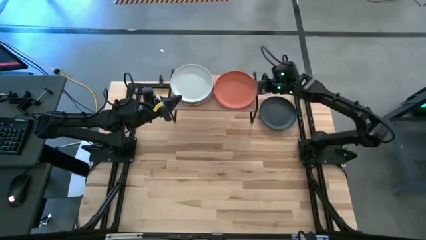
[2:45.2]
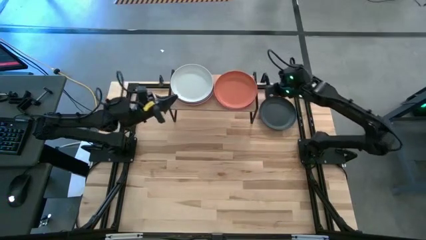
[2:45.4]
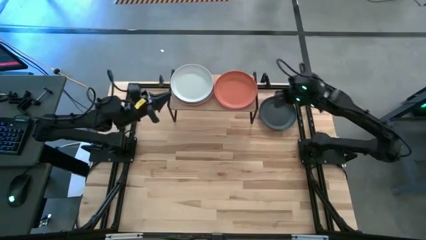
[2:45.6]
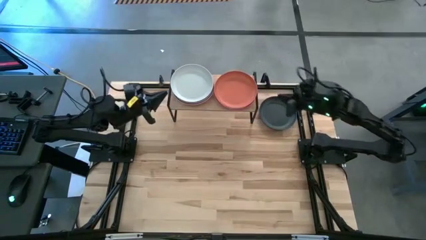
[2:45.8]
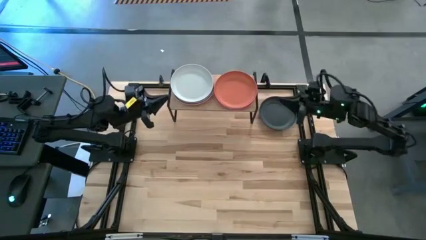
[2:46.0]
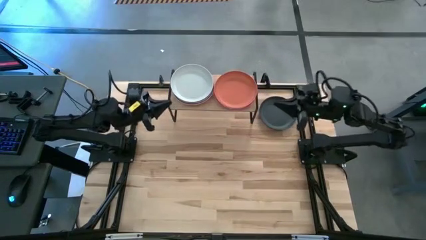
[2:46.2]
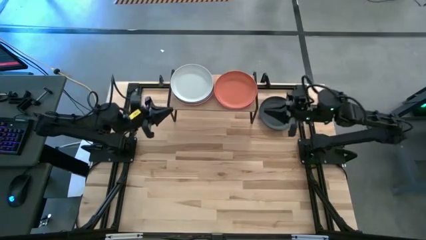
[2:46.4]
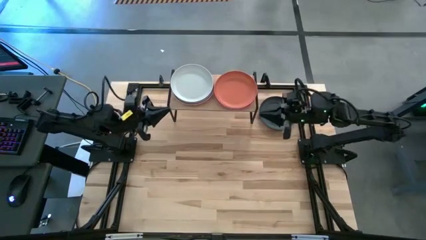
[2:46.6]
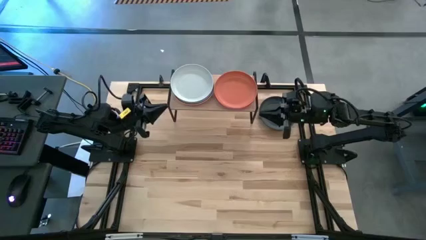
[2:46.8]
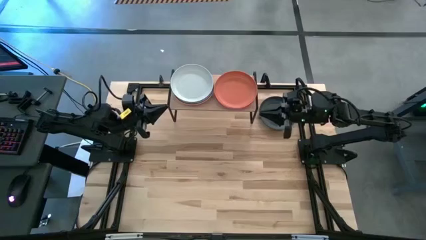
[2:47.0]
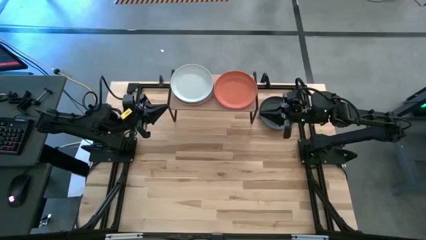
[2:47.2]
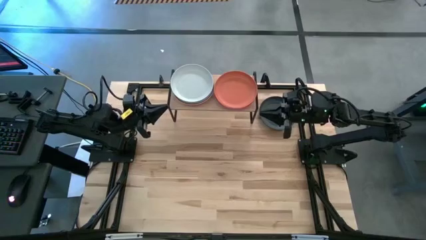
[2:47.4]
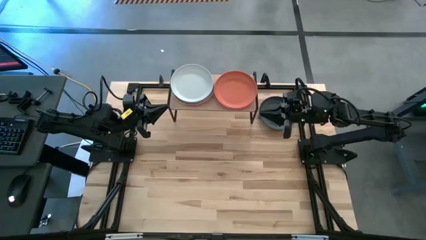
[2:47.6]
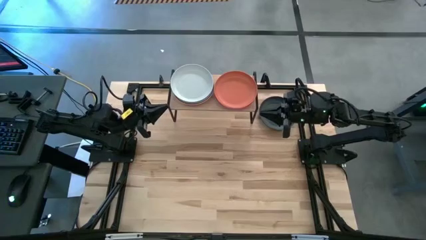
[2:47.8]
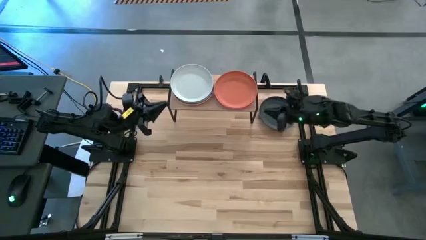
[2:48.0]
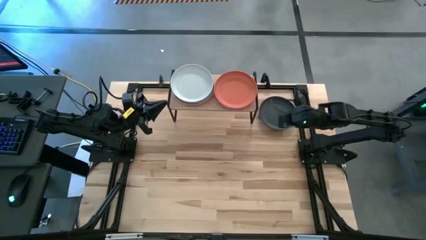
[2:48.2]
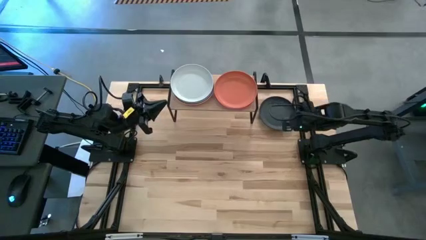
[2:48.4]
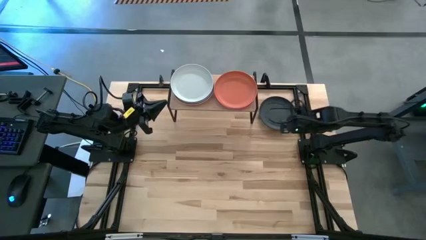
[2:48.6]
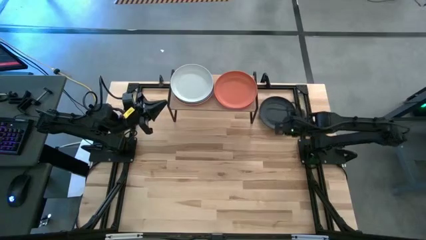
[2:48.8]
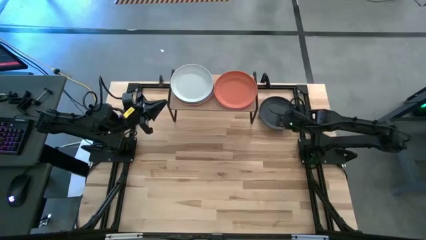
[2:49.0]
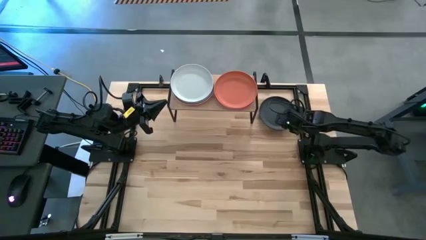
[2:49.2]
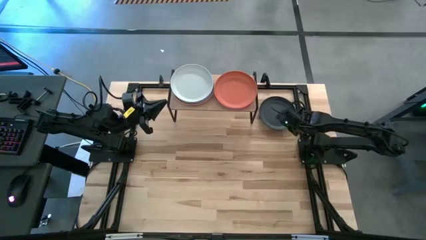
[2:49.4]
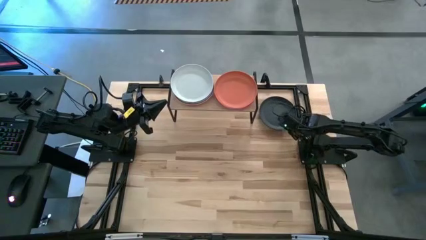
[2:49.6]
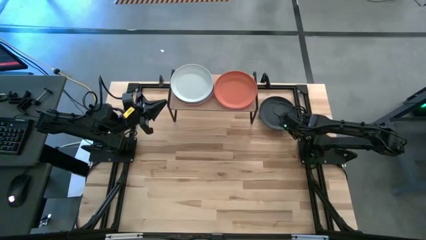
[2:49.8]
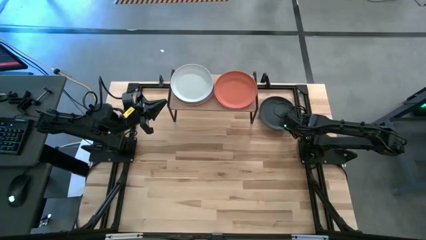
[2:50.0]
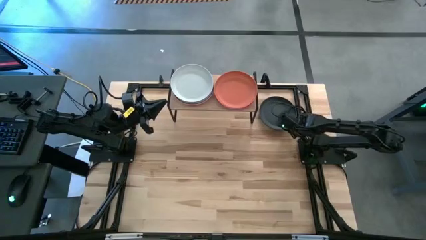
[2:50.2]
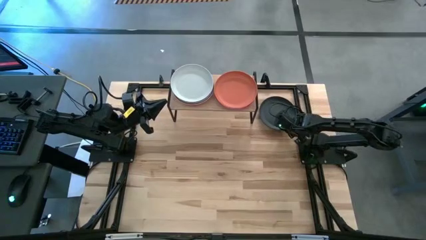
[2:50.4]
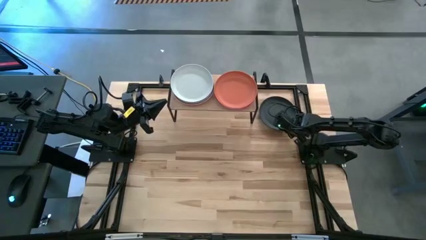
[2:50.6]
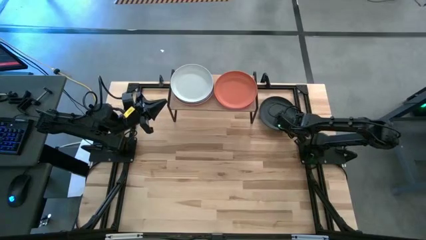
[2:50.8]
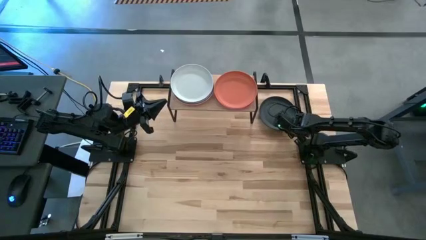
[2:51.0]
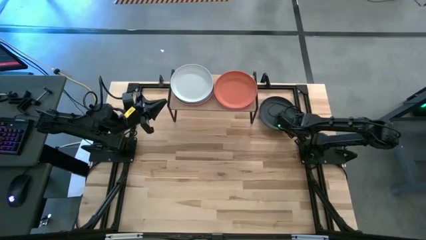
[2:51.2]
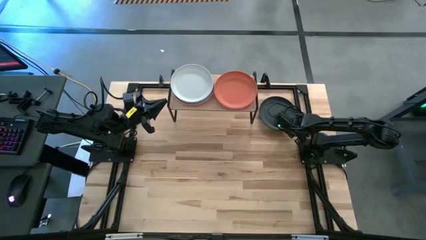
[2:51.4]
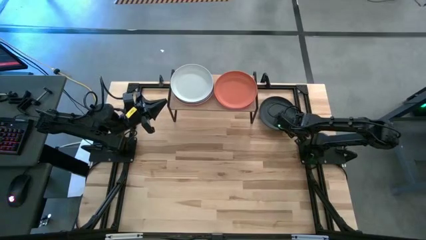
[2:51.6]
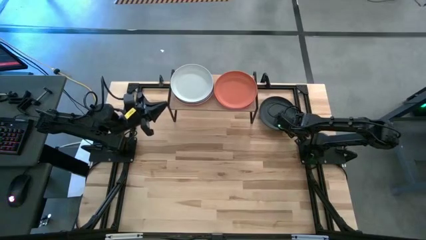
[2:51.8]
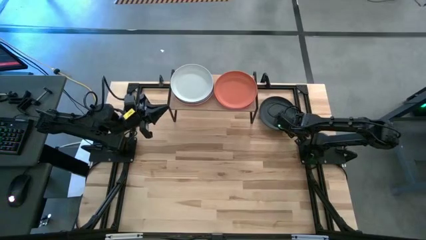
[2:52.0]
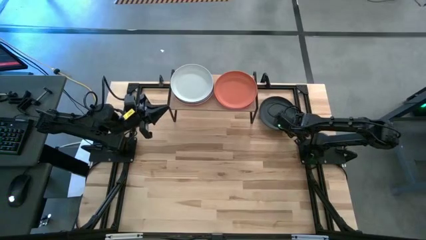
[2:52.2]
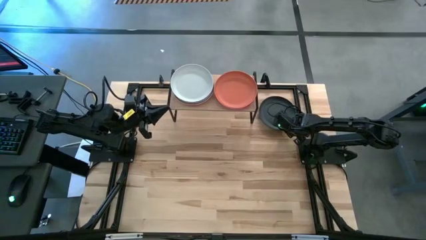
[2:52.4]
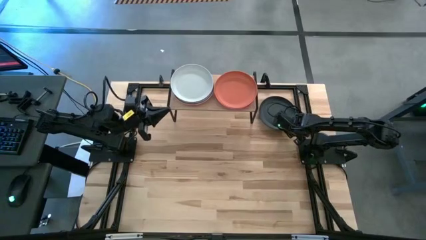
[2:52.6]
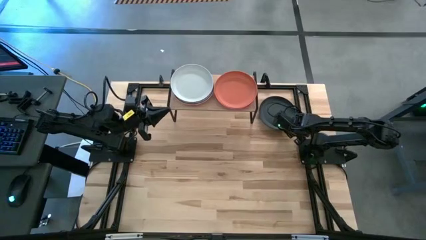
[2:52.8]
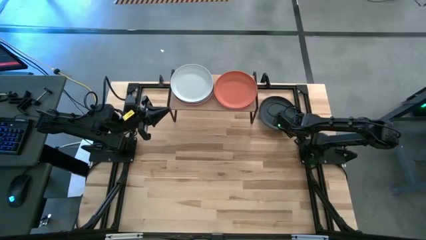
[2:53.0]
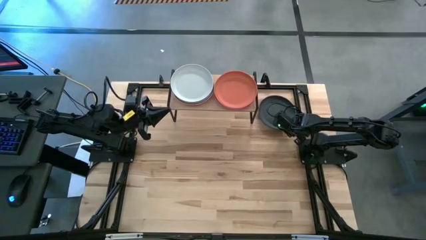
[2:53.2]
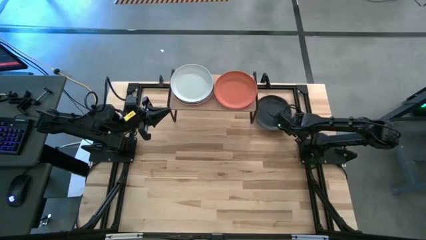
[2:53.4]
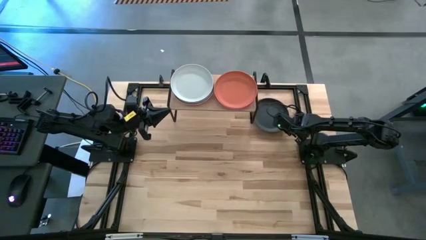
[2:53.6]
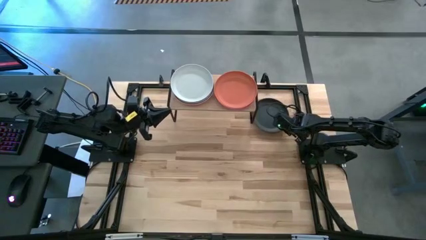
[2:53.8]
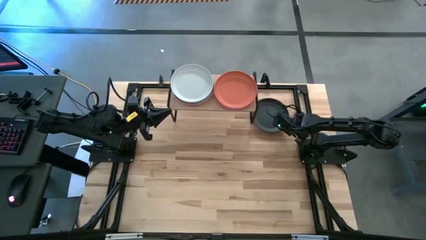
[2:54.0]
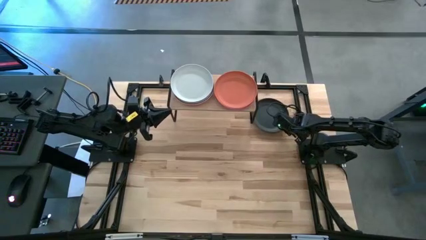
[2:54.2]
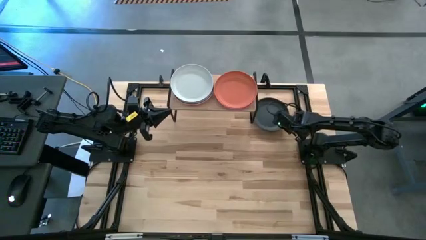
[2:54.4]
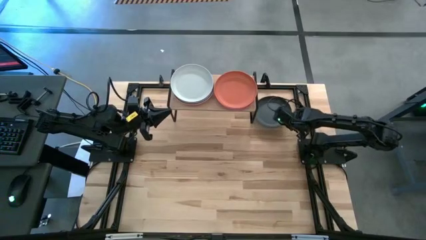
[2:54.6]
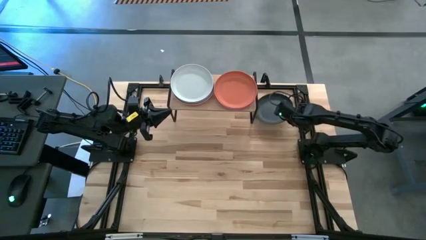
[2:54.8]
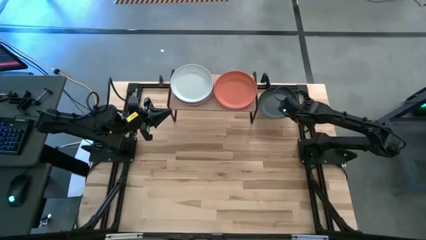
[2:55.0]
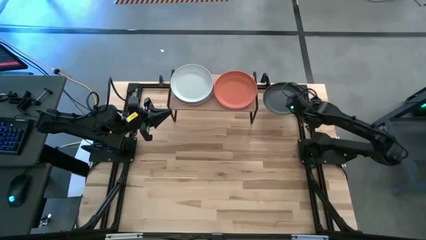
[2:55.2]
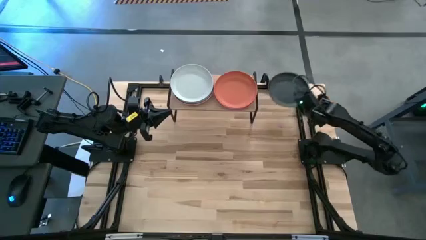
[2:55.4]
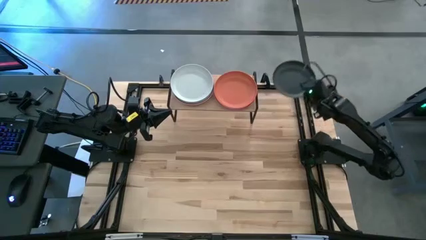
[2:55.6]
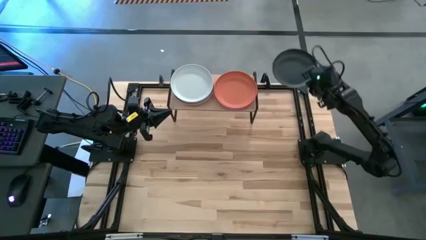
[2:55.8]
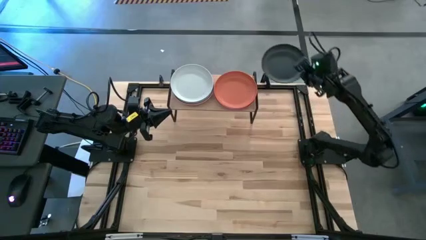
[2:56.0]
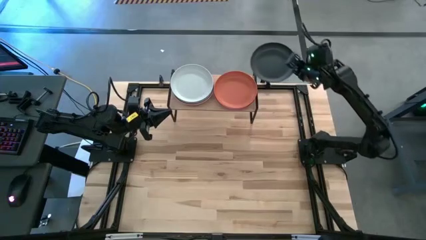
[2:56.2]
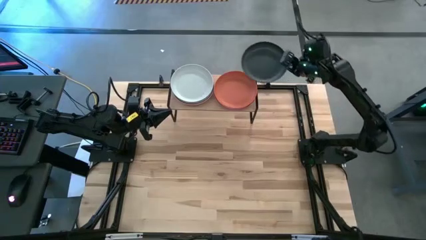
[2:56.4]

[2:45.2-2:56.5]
Task: Place and stack plates onto a shelf
Stack the black plate on top of the brown plate

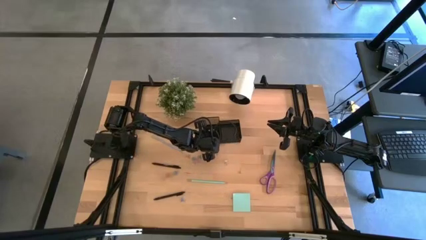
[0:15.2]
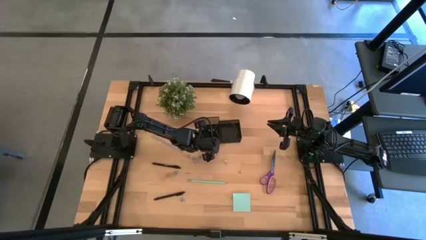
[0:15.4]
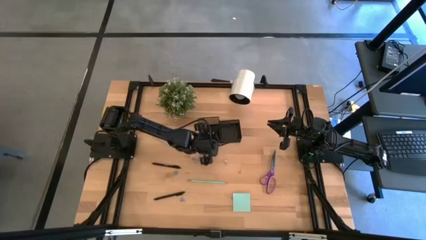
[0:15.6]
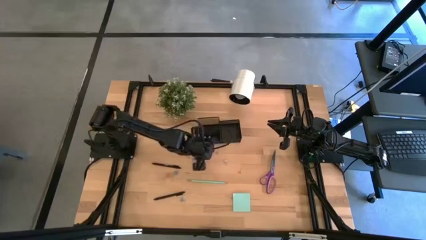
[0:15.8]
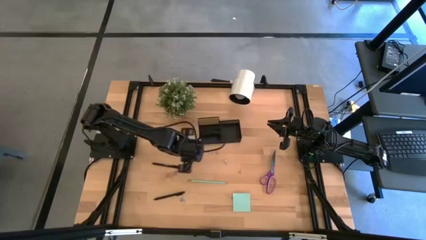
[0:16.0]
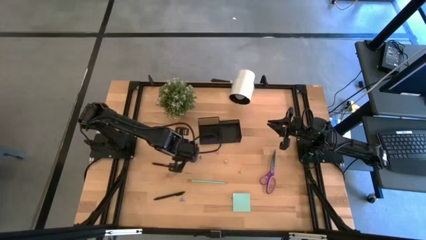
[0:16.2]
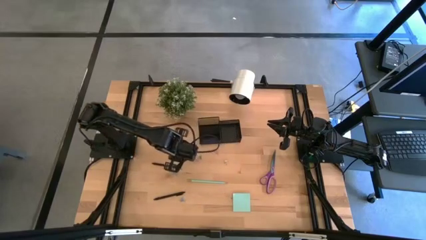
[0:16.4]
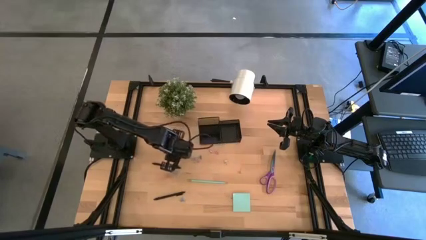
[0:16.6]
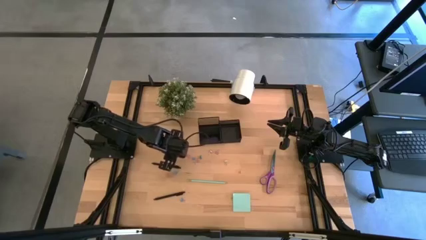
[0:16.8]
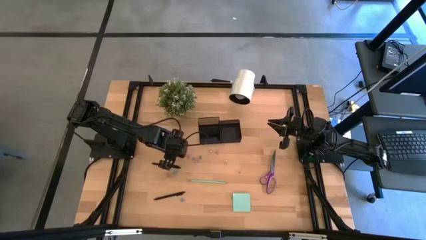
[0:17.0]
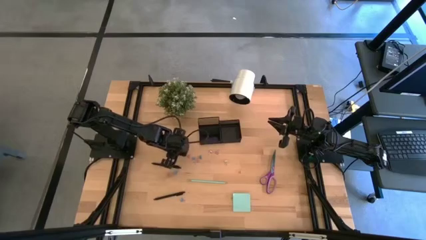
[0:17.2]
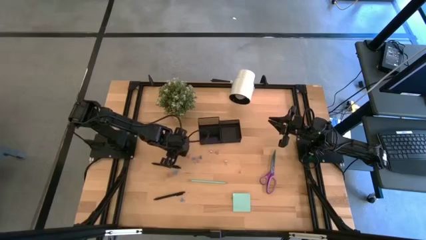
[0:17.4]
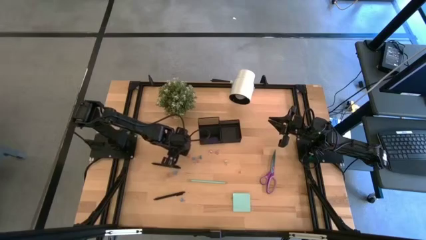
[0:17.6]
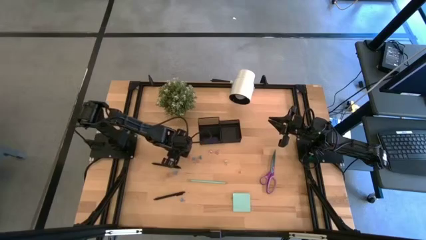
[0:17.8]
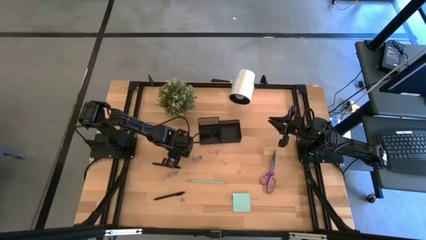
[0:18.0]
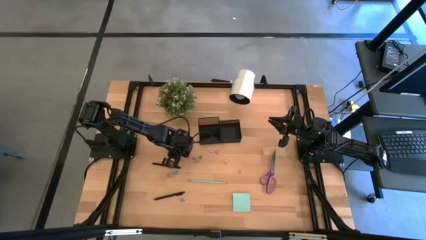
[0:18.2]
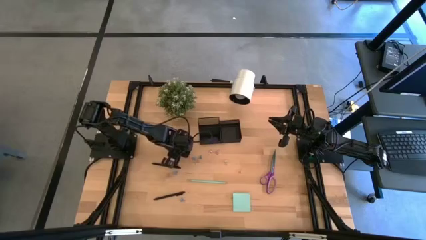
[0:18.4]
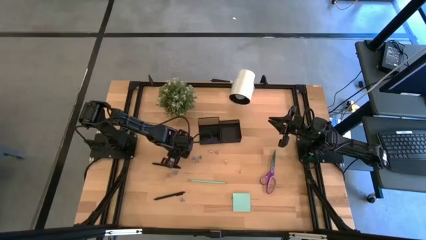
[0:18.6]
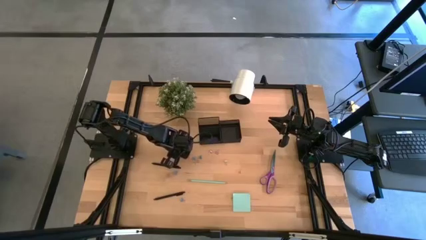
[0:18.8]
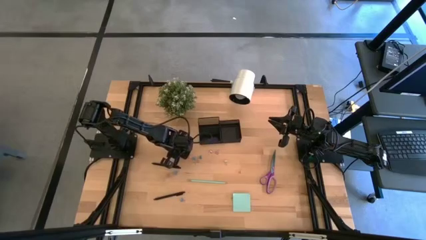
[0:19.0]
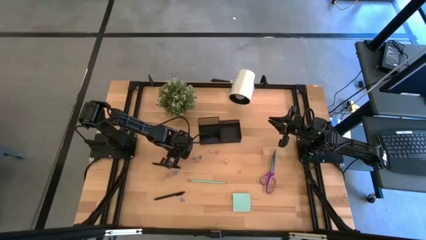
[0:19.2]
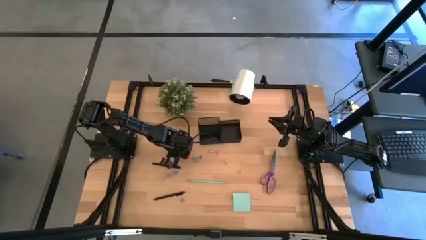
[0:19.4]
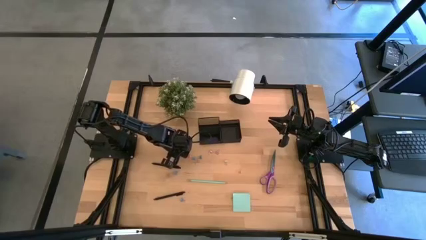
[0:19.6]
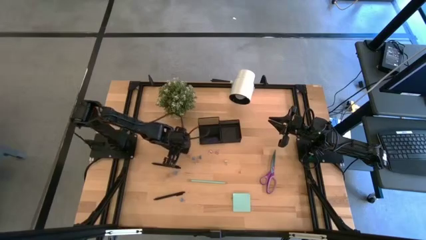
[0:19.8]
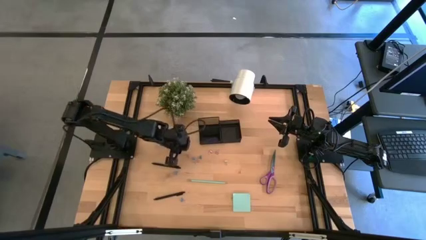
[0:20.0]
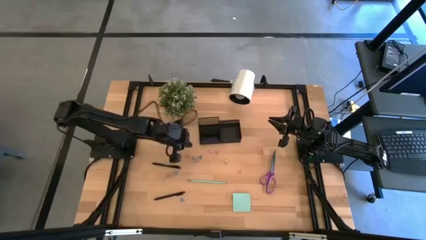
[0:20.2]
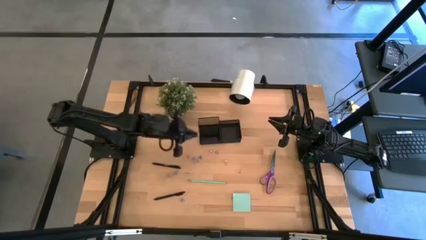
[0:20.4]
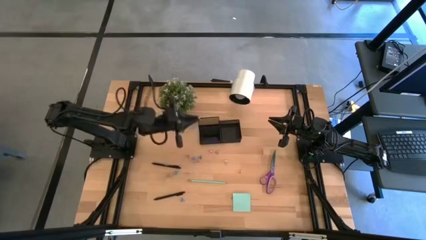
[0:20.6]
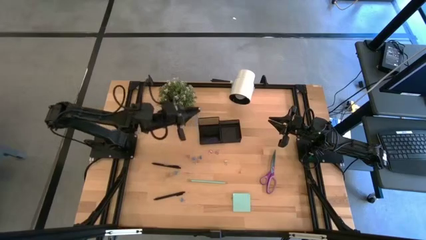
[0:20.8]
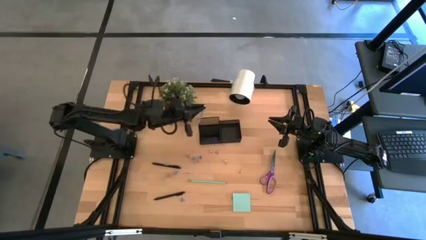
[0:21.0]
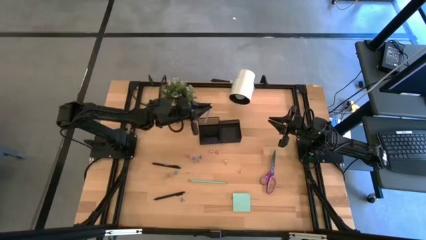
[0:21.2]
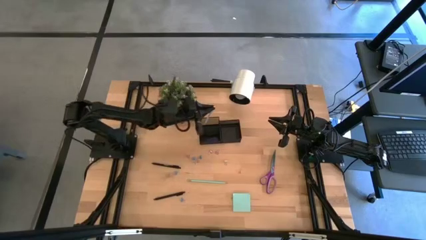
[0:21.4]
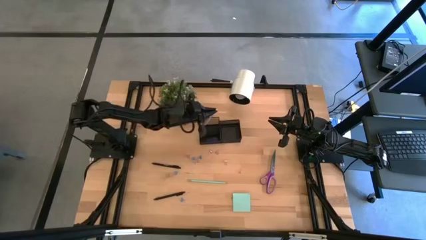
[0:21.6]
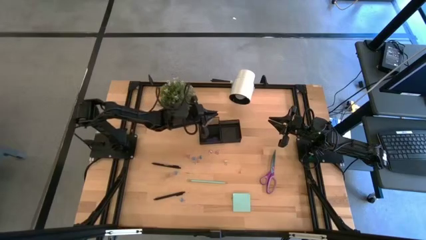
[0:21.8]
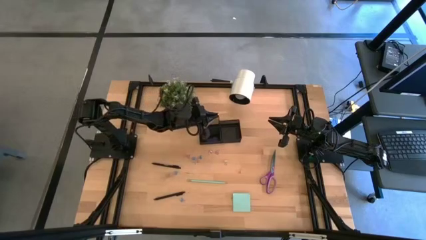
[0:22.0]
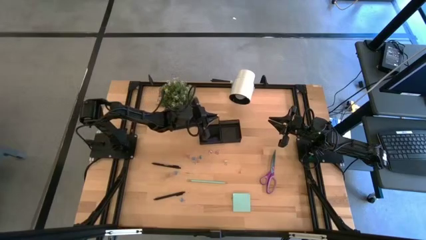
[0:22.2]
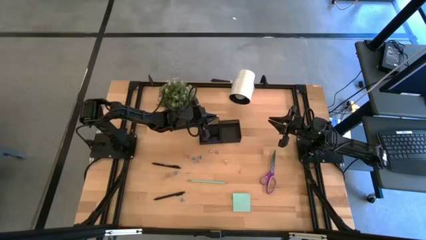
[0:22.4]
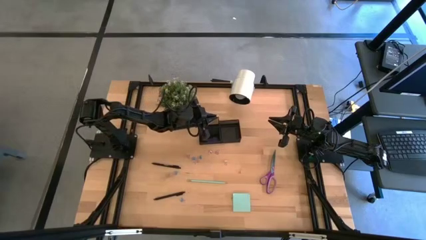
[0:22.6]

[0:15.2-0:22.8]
Task: Pick and place office supplies into organizer
Put the blue pencil into the black desk organizer
